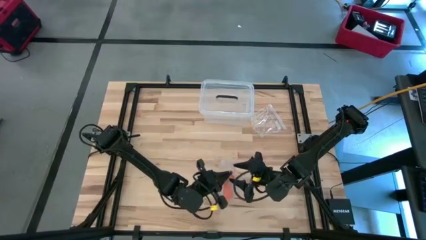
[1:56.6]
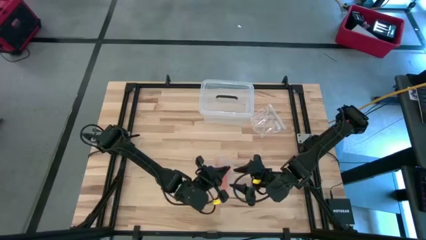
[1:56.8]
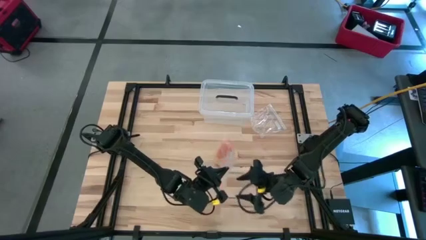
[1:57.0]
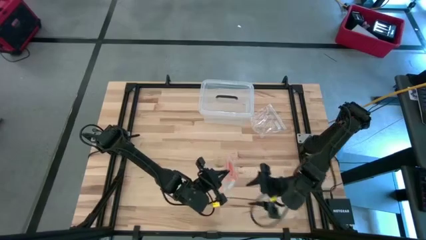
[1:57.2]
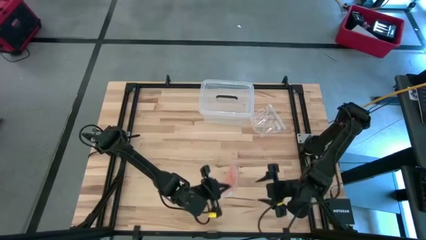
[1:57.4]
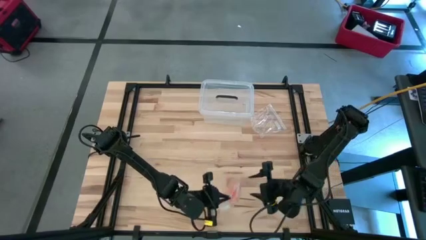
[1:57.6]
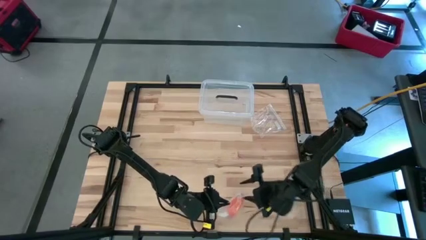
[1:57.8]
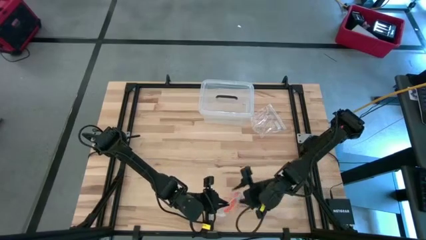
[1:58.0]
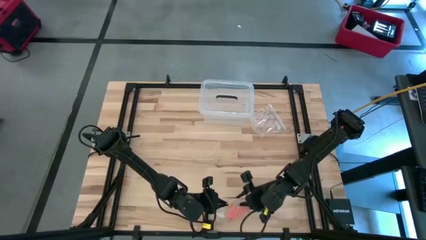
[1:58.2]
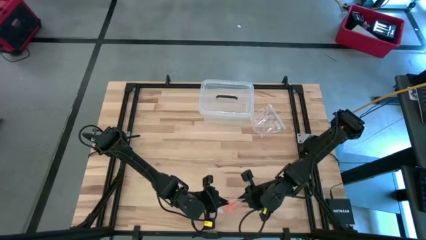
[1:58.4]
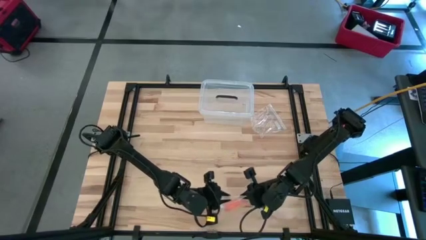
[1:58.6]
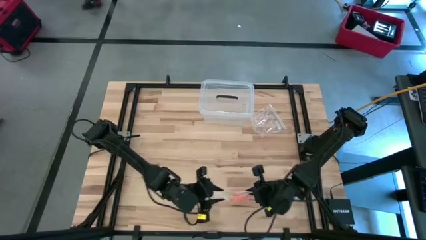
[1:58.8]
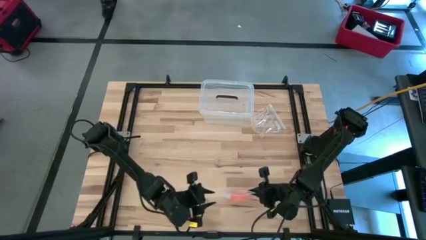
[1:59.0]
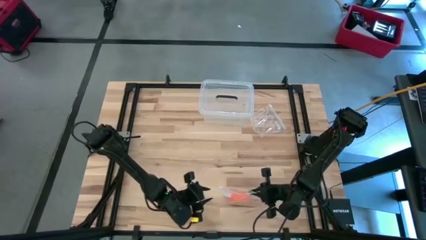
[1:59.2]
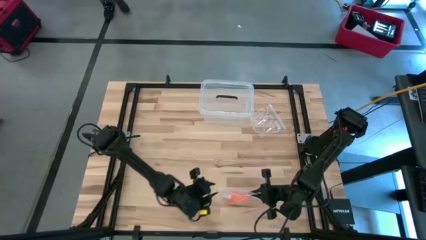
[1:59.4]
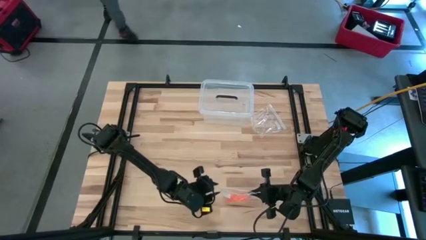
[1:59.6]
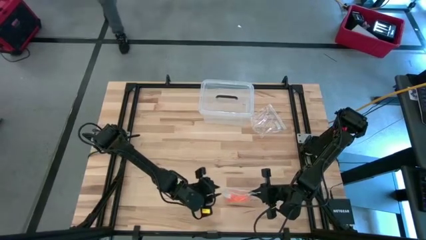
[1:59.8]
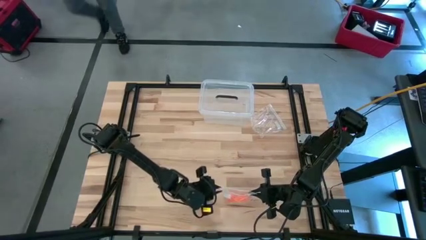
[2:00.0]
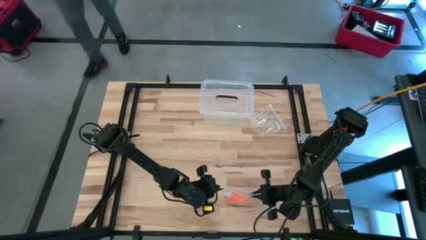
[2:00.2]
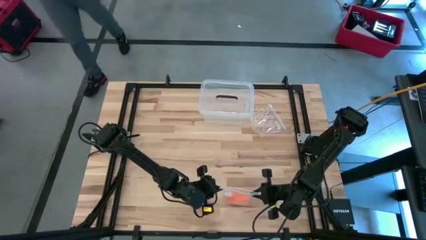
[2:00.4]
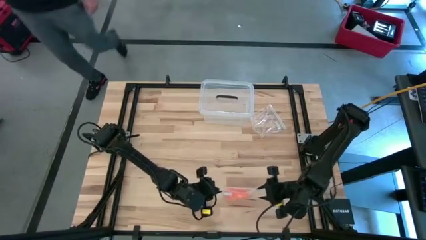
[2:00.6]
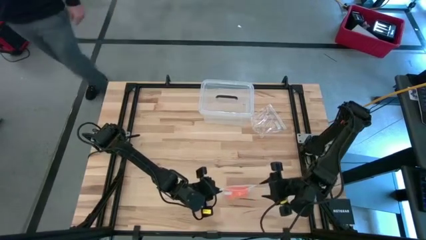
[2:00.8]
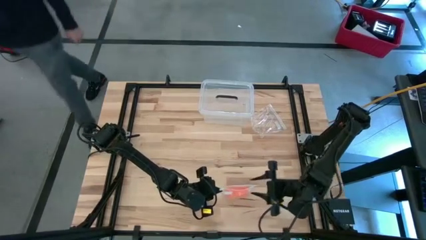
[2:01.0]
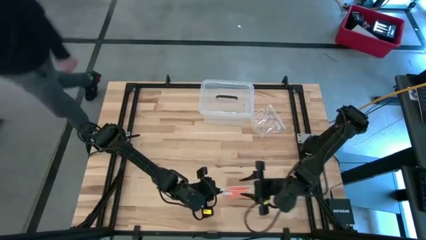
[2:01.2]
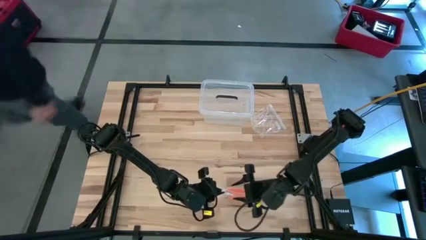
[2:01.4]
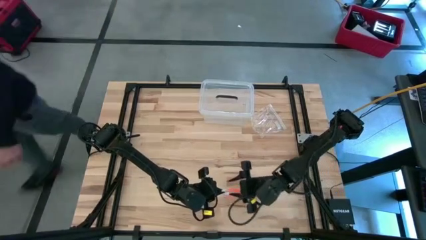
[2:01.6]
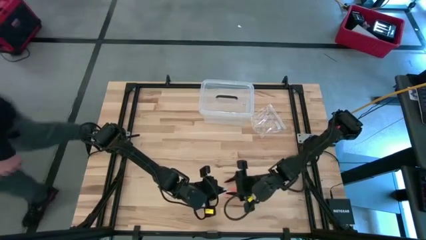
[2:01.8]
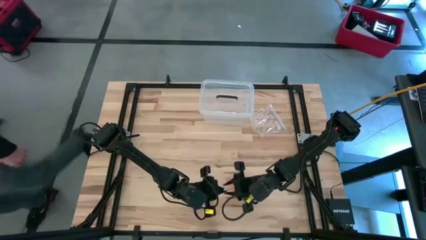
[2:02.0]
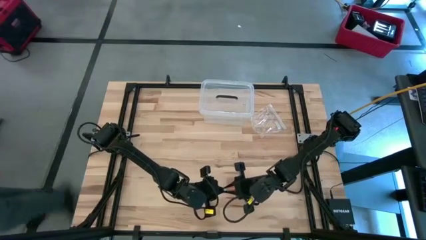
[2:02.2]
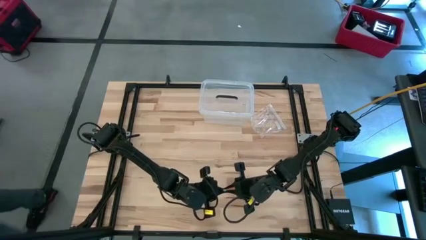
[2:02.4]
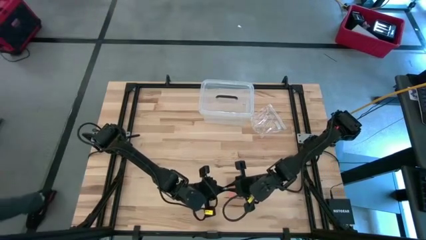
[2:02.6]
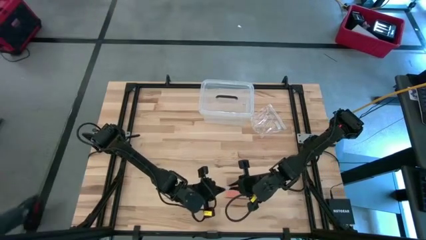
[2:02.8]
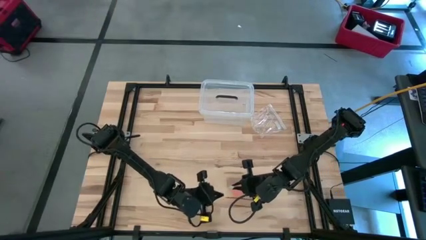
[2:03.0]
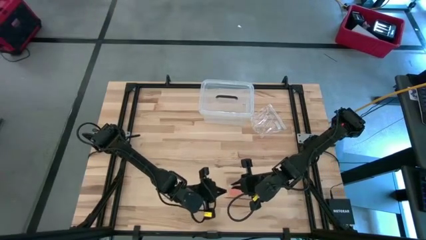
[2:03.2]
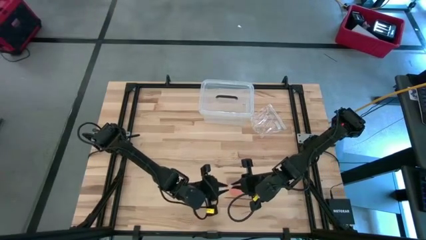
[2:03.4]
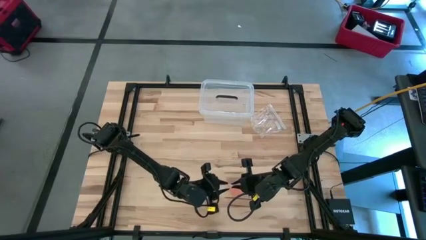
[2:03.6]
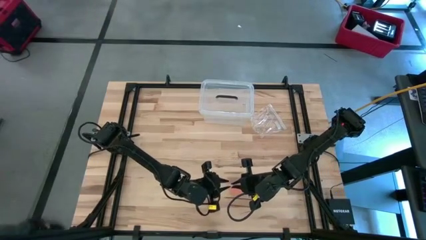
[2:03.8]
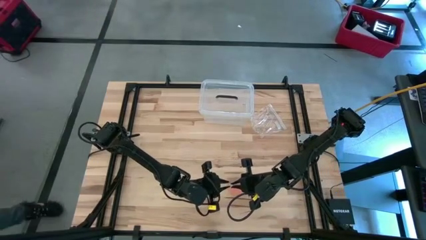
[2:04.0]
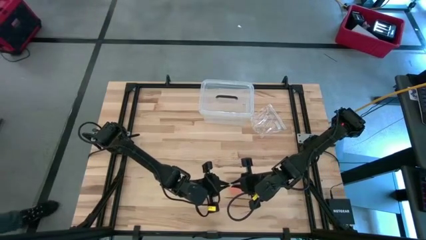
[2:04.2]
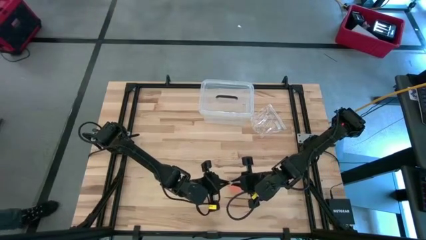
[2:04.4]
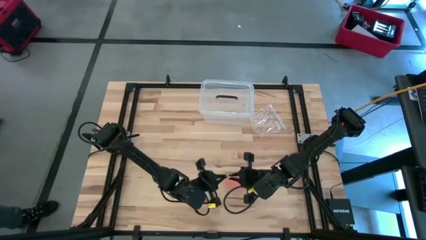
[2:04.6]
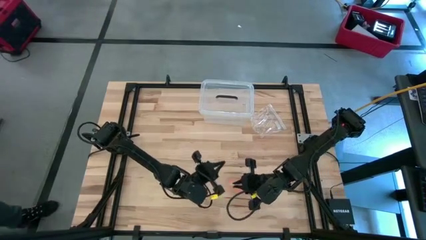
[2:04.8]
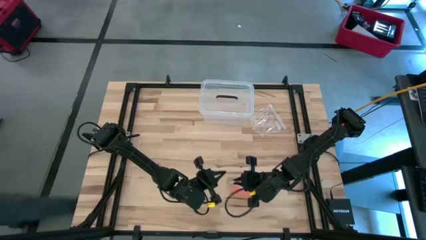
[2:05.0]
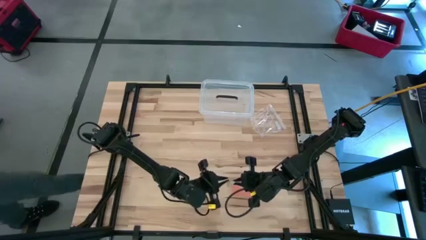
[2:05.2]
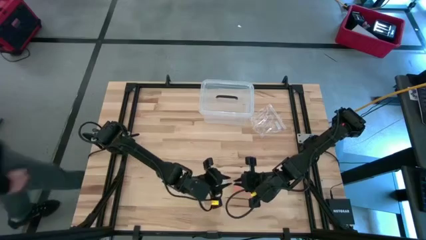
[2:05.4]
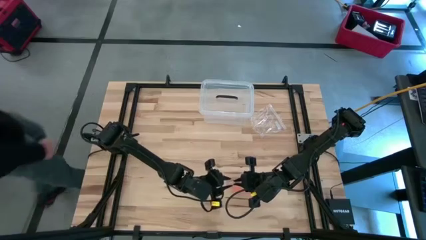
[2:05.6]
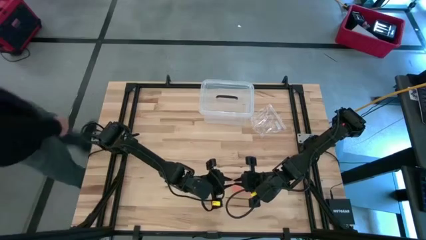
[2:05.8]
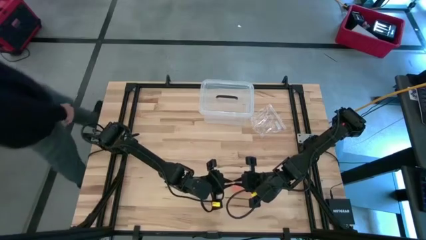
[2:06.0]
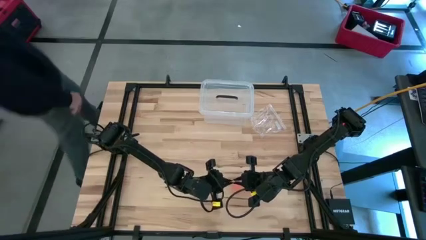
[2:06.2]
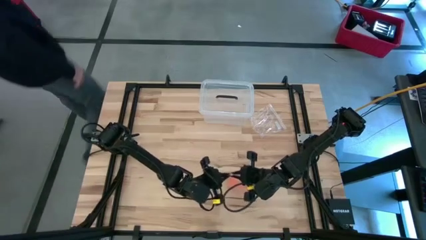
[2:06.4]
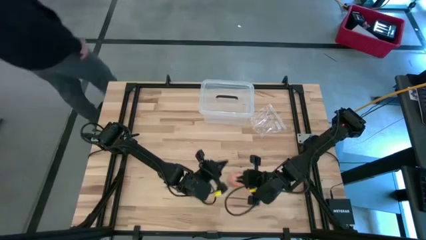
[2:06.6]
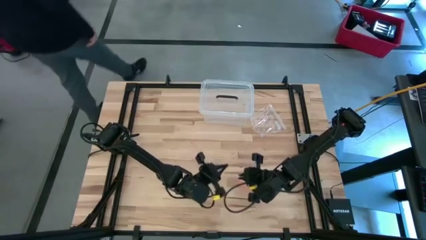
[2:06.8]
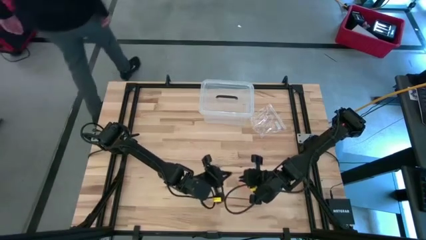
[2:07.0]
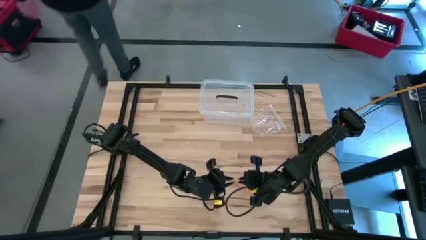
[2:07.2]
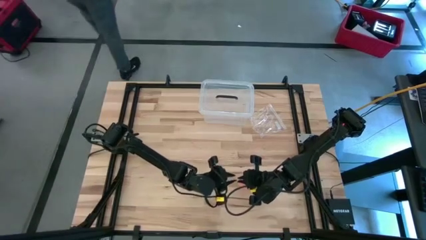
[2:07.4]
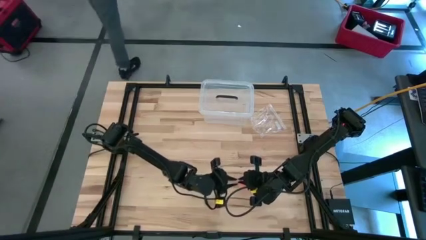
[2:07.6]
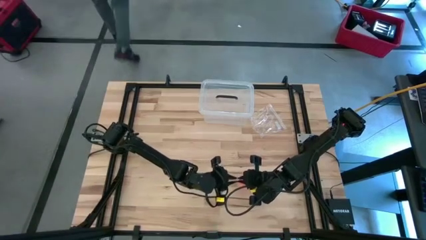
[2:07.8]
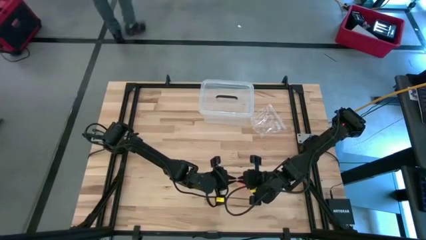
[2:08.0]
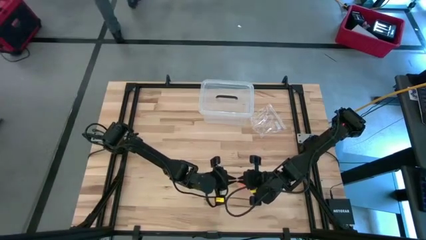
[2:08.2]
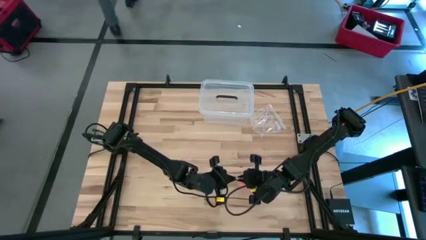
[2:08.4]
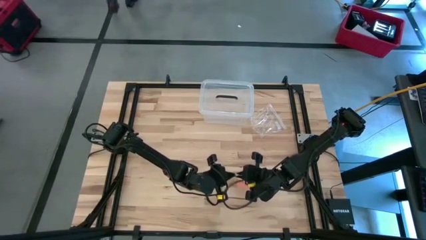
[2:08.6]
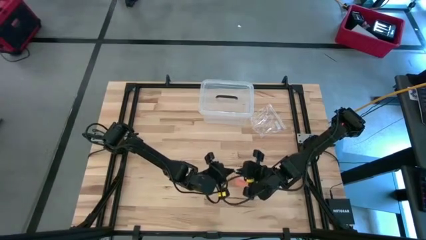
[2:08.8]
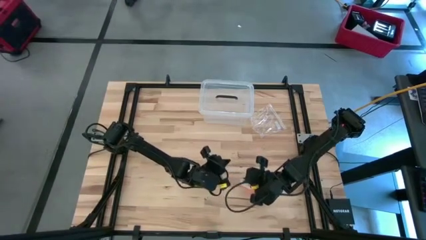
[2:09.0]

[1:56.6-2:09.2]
Task: Roll bandage
Close the transparent zip bag

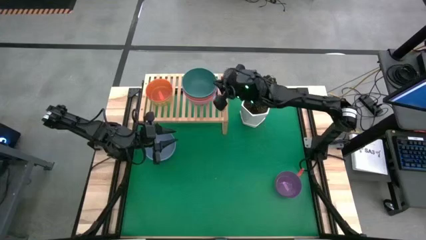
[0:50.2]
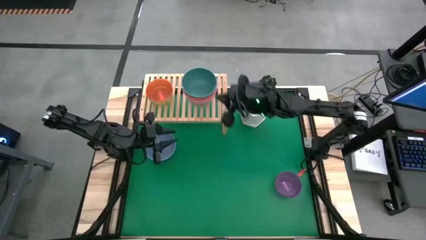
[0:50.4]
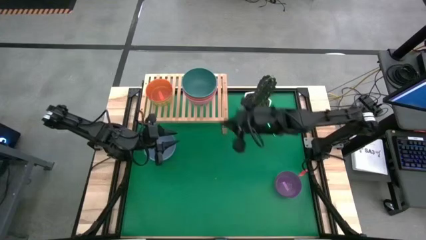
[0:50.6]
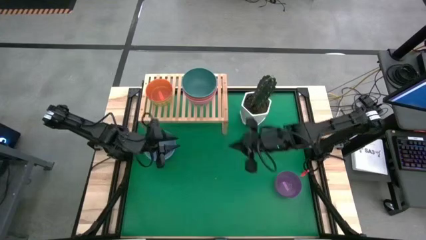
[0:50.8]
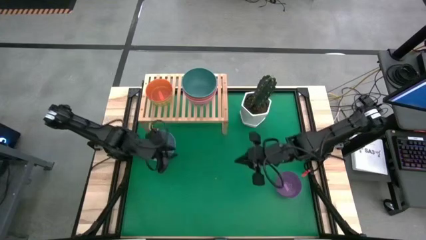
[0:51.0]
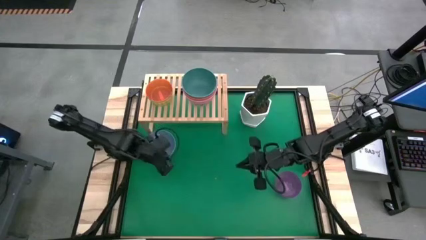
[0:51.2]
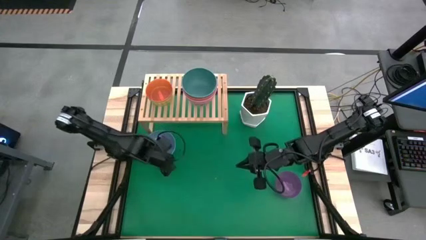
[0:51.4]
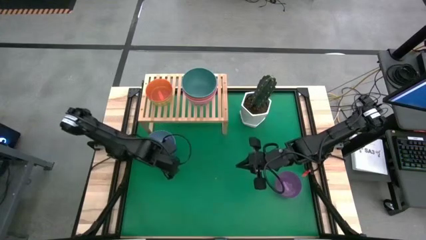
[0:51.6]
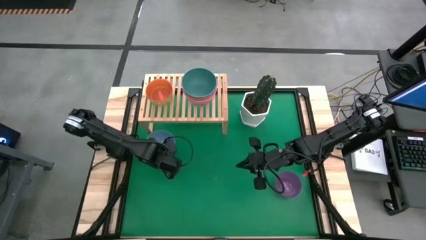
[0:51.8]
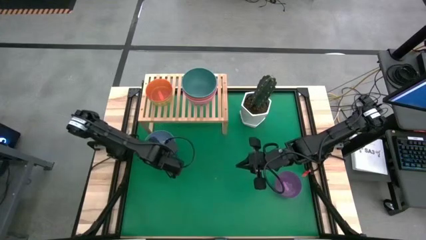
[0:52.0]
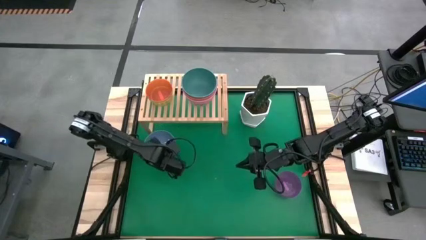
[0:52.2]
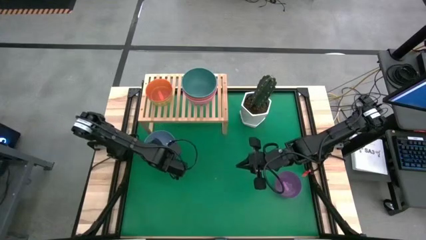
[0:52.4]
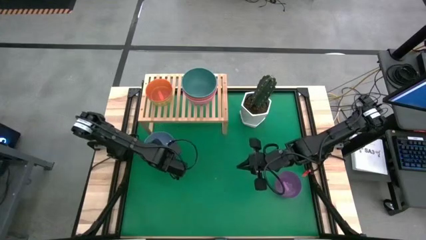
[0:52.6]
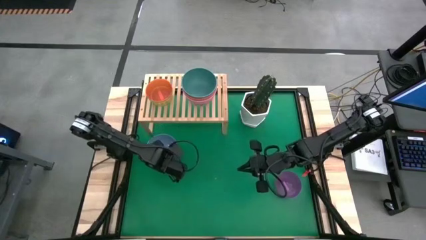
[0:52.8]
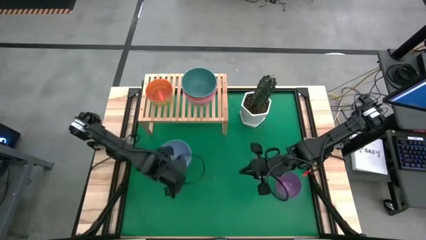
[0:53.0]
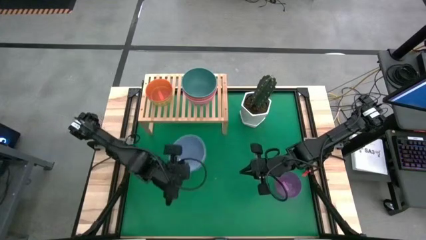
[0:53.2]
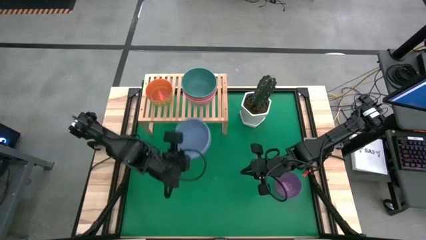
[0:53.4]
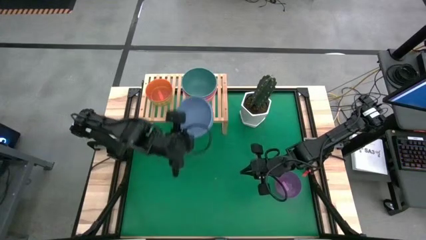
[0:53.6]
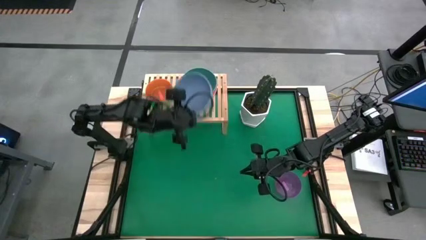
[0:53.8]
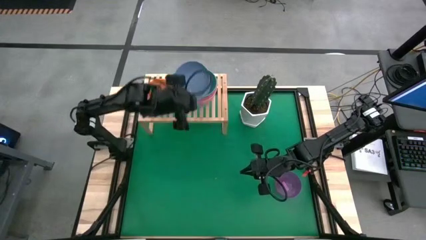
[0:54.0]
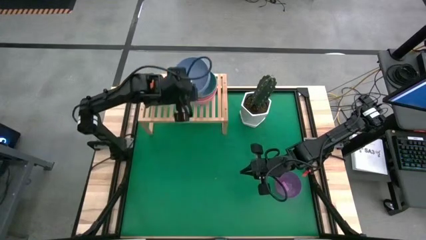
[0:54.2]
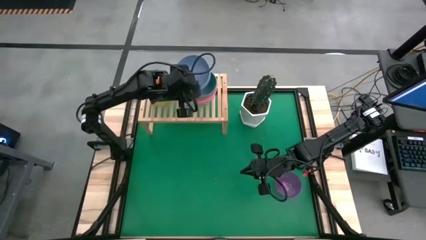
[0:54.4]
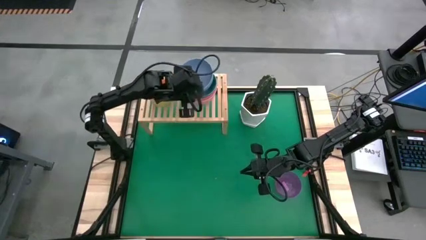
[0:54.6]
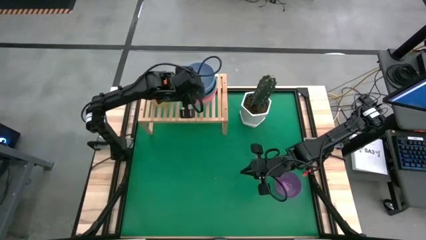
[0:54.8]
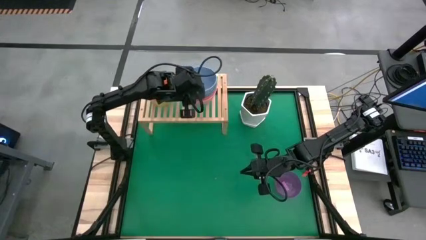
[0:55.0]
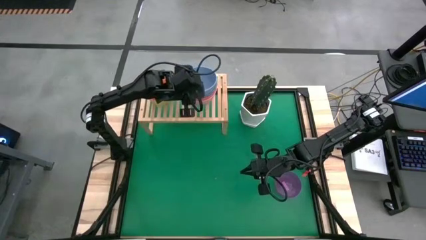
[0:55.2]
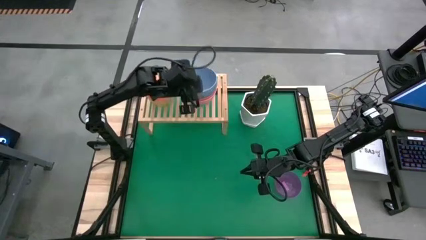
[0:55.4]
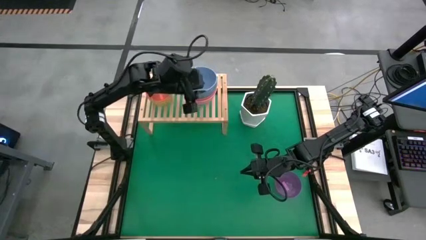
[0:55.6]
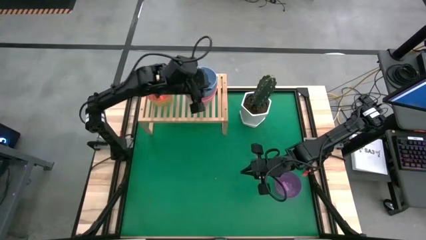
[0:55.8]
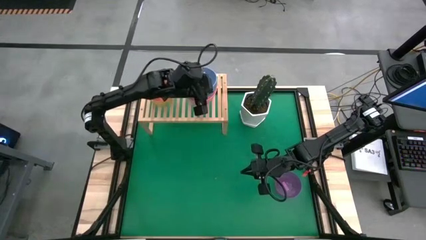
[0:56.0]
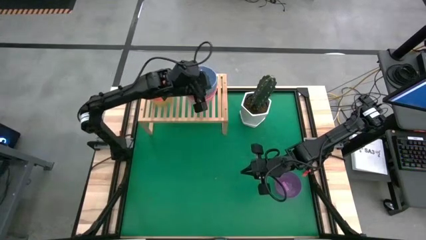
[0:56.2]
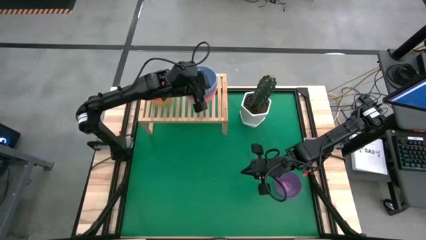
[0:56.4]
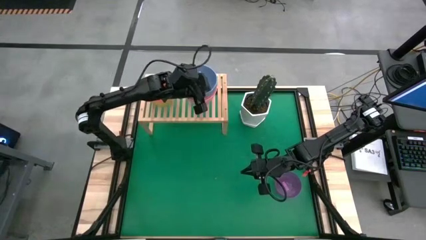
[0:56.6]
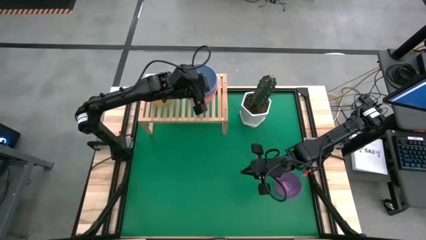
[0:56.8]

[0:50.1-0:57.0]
Task: Place and stack bowls onto a shelf
Stack the blue bowl on the top of the teal bowl on the shelf
